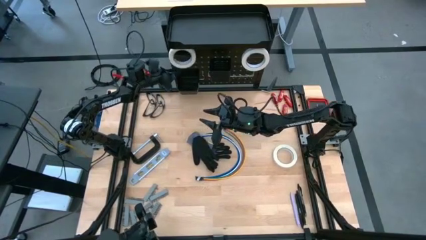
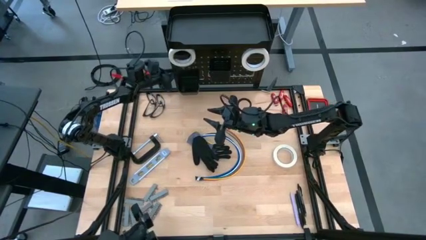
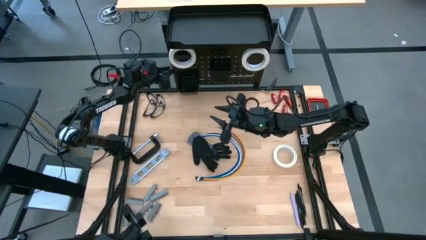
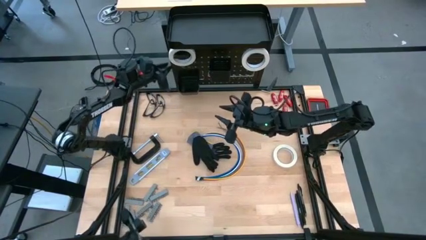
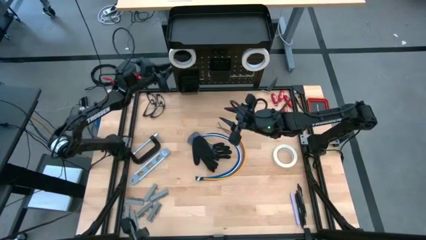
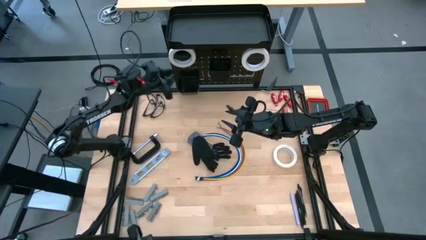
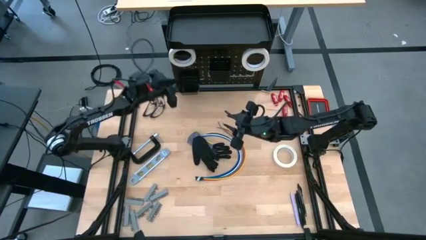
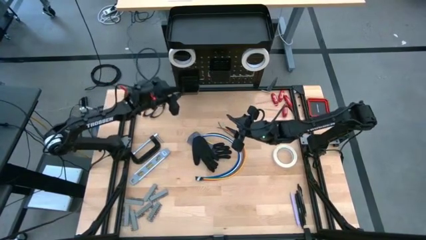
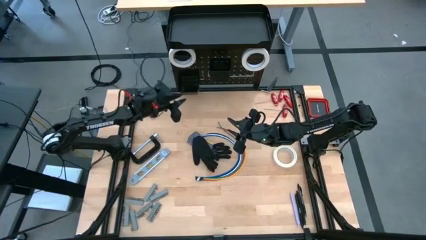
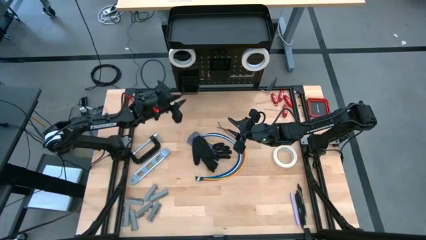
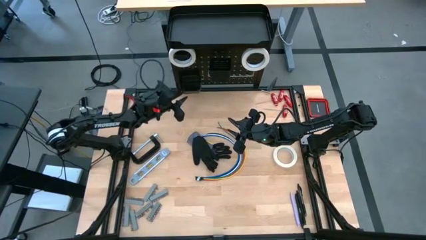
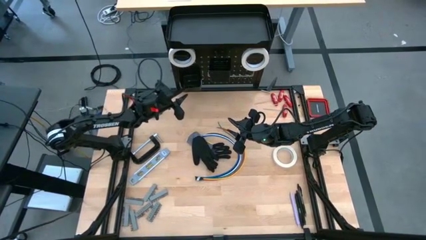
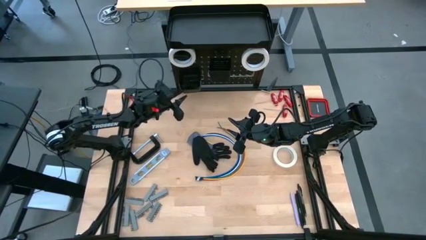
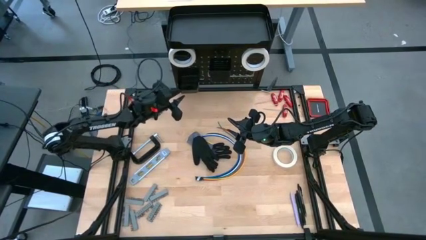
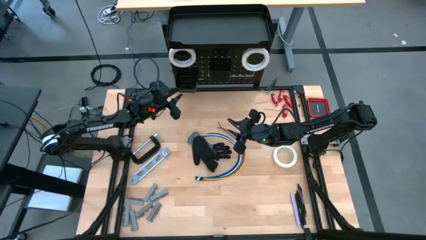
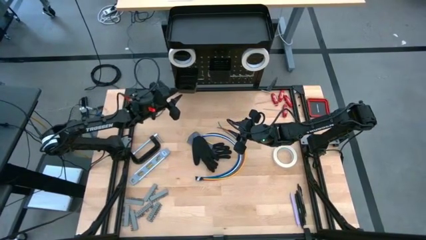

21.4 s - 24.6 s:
Task: Hang tools onto peg board
Adjust the left black bin on the peg board

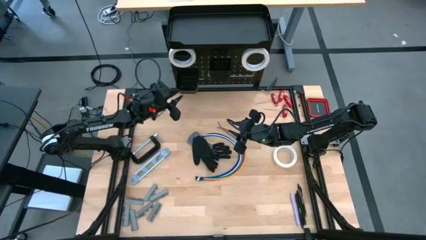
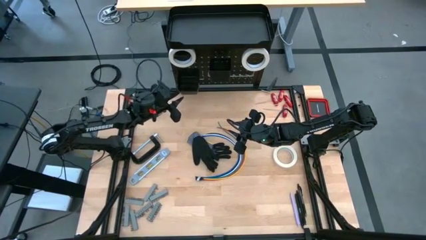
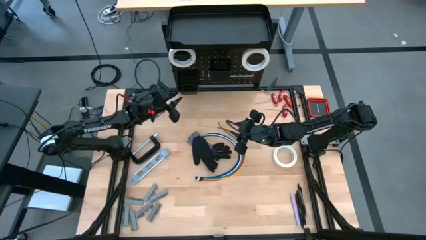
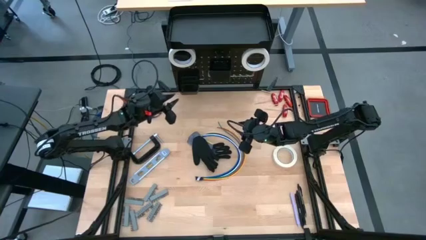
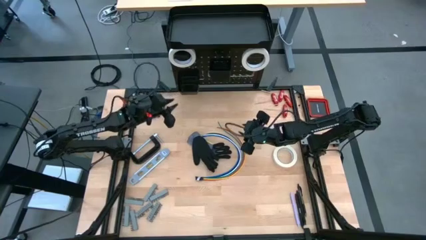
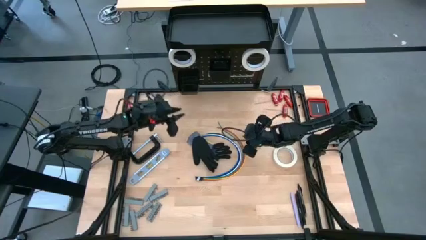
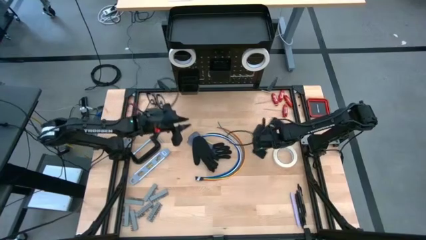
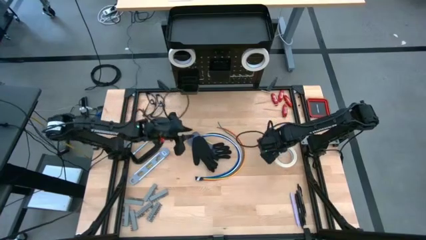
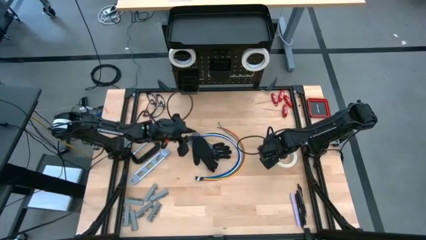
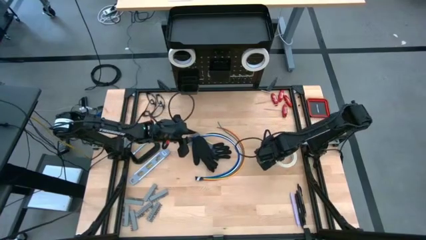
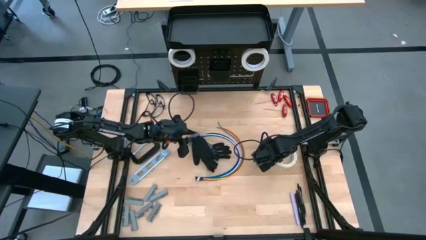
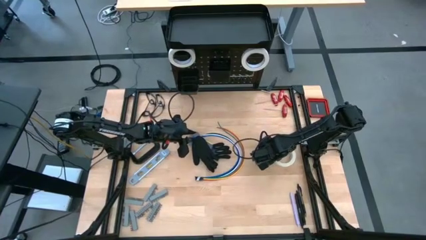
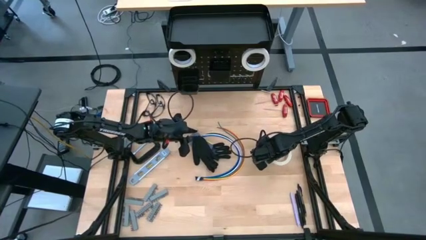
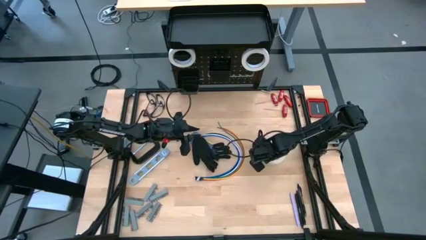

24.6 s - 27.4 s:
Hang the white masking tape on the peg board

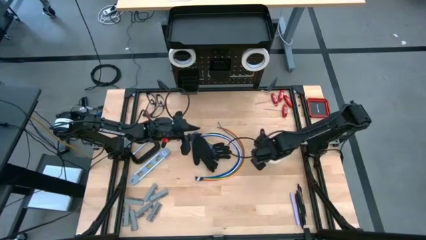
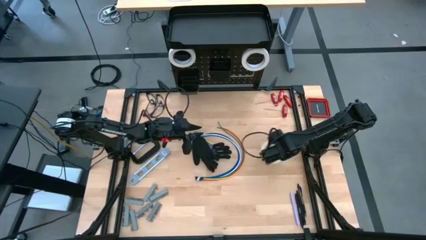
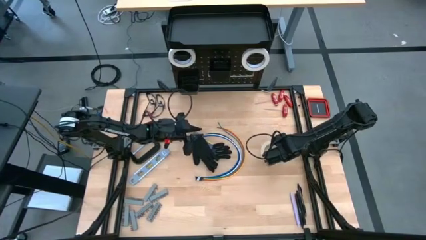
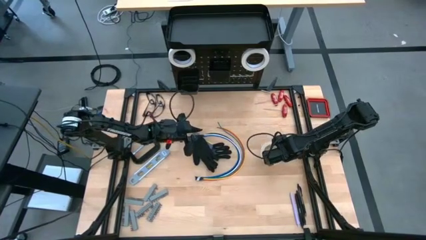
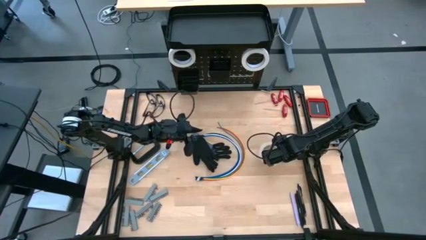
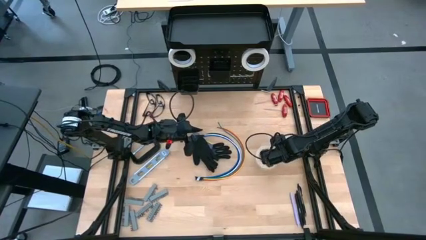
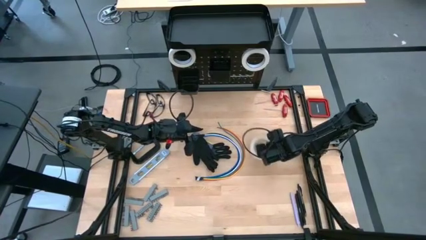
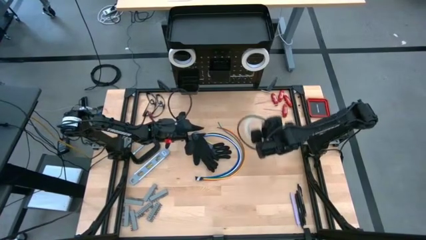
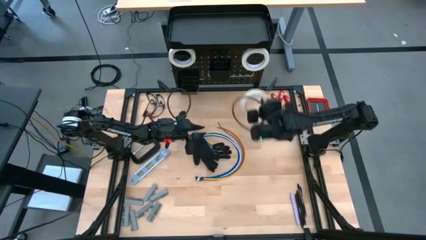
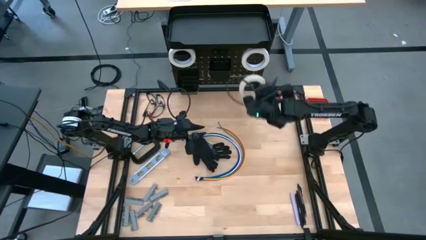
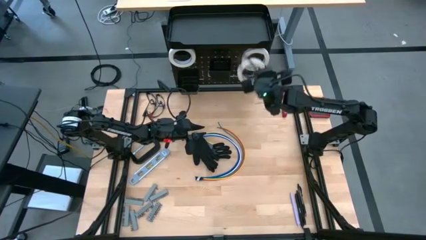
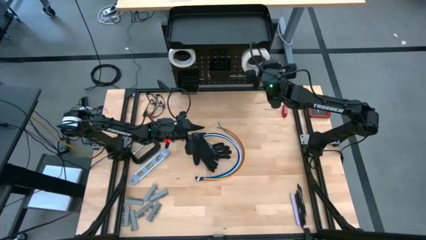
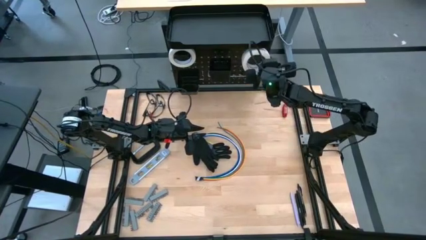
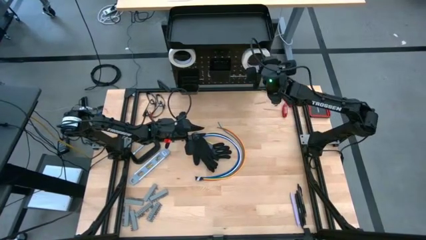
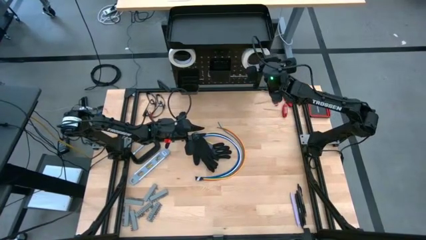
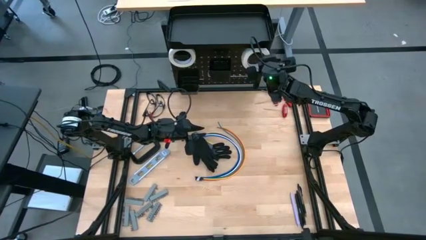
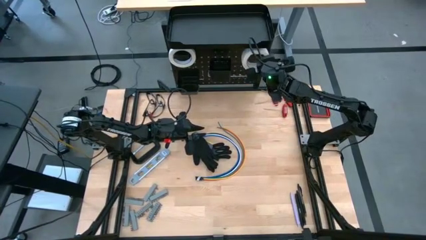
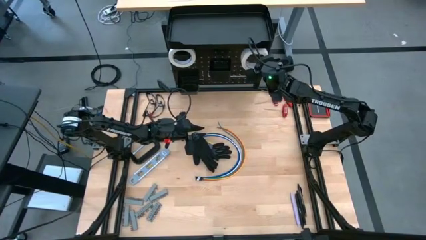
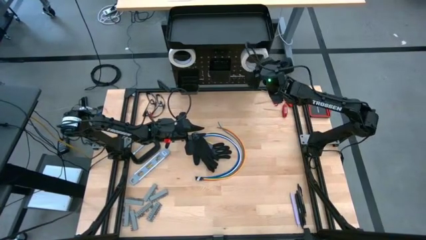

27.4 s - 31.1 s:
Hang the white masking tape on the peg board

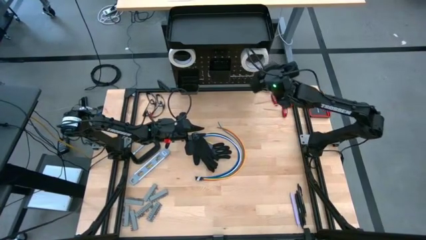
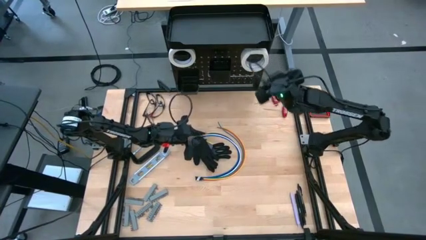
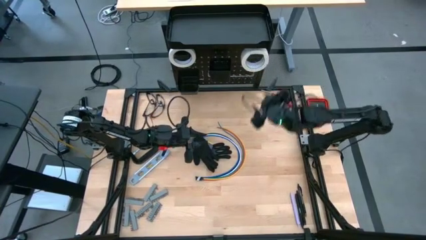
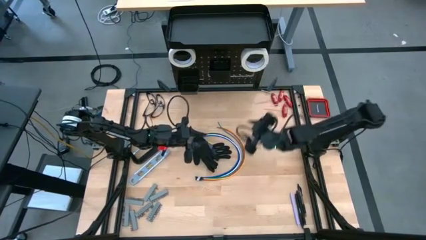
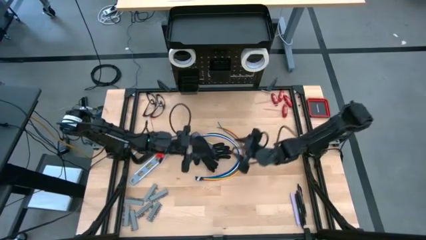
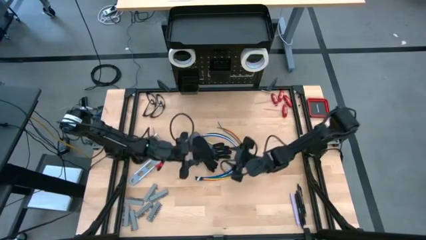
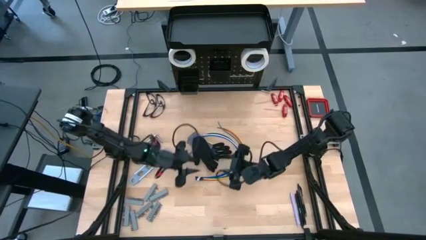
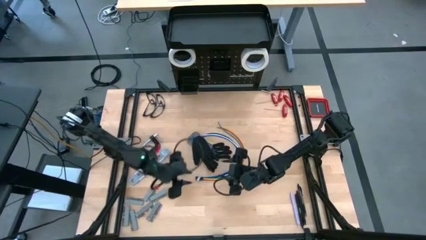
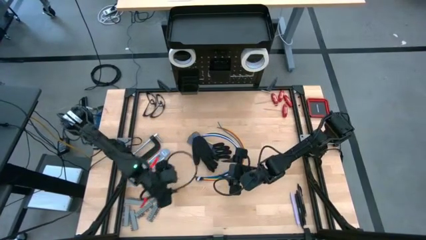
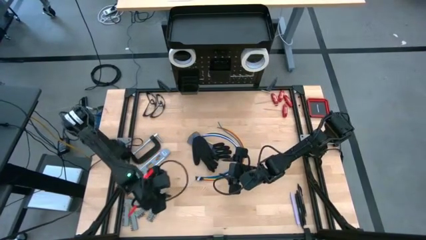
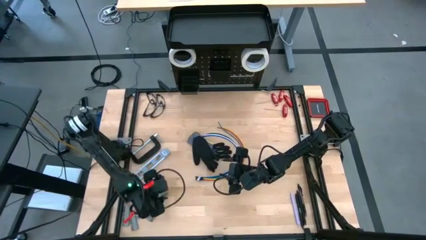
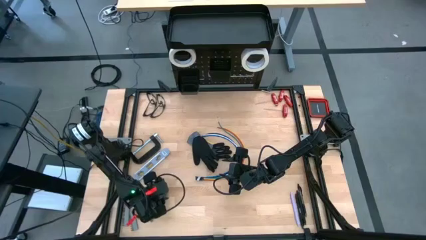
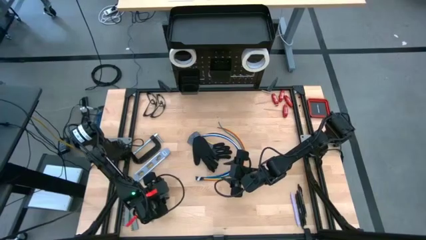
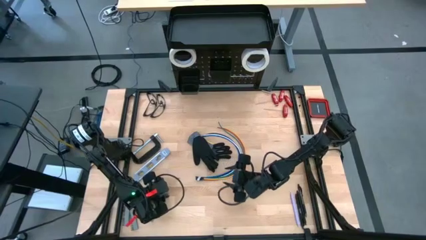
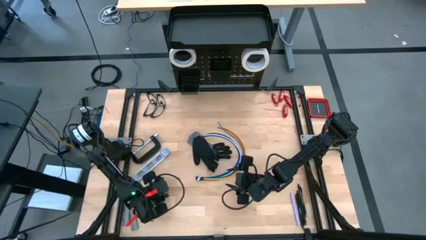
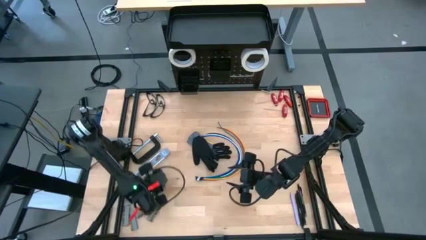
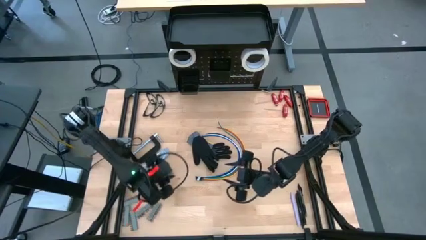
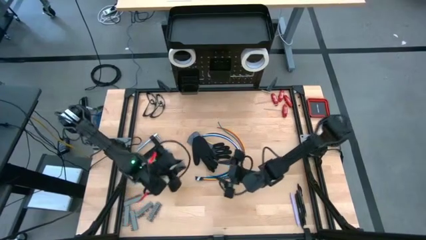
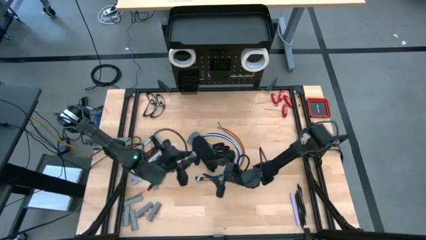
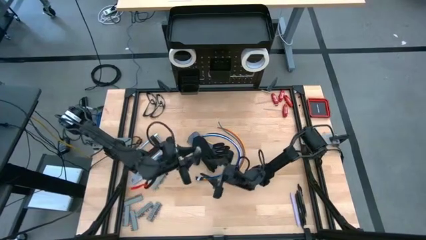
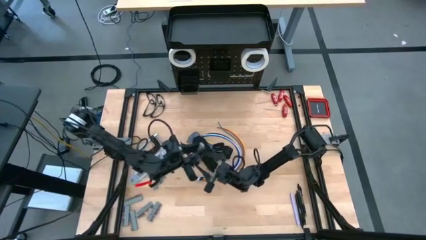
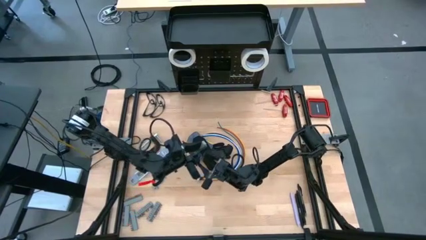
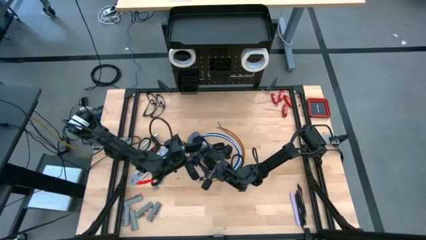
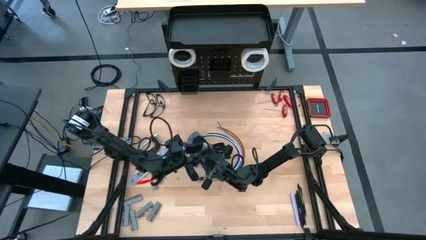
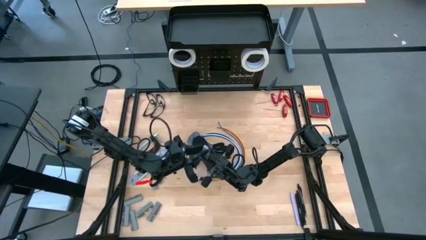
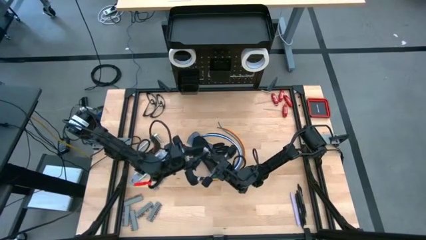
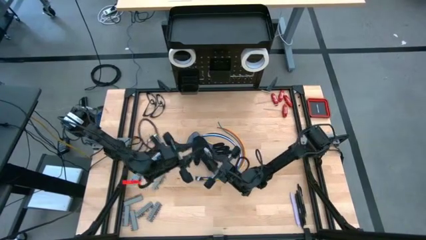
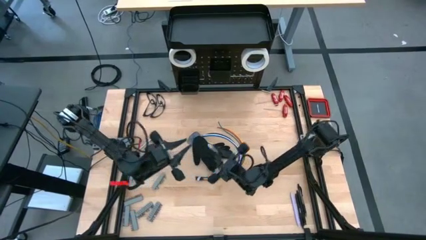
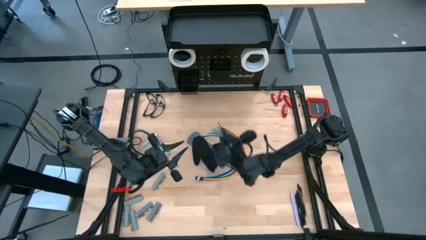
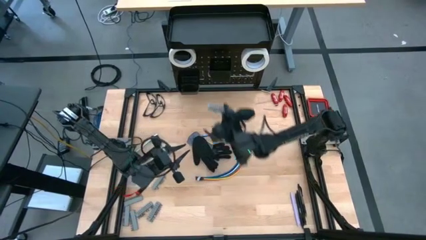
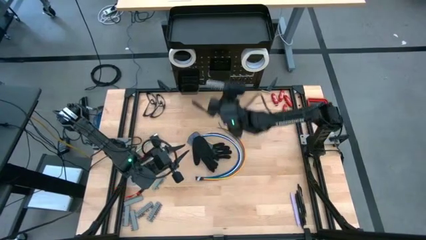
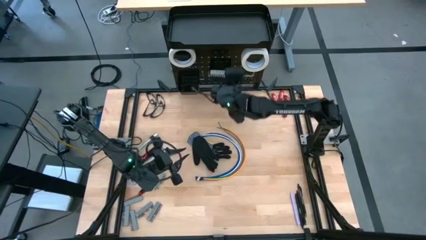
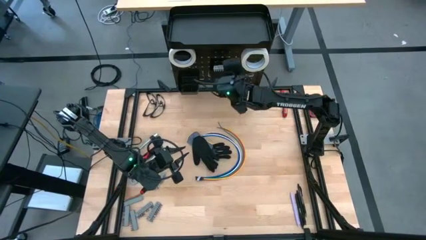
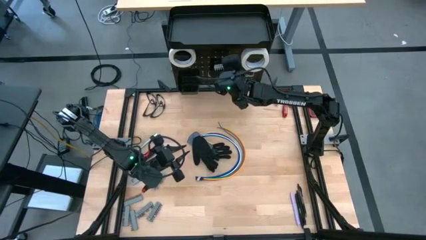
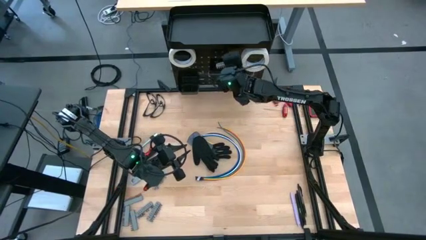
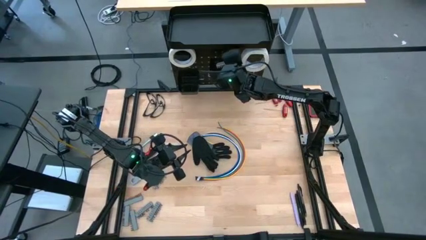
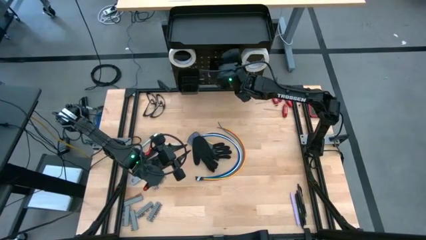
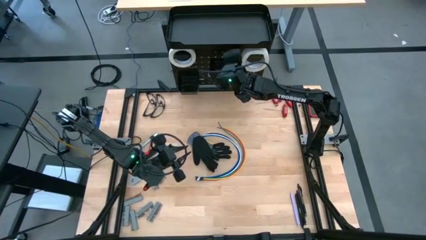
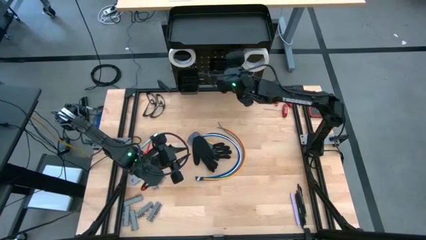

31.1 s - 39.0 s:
Put the terminal block into the black bin on the peg board
